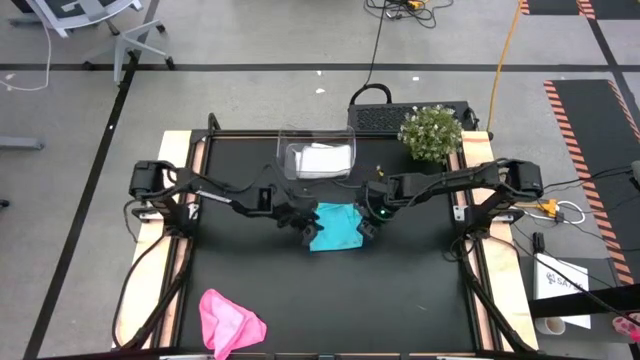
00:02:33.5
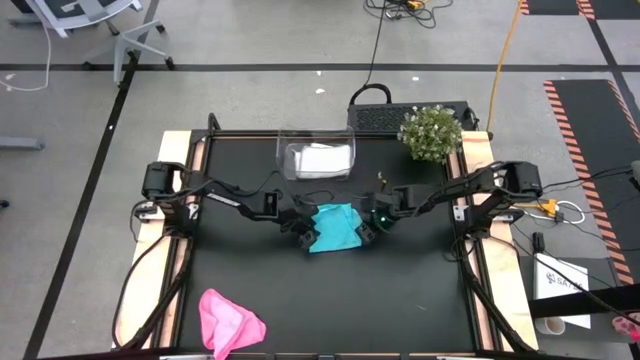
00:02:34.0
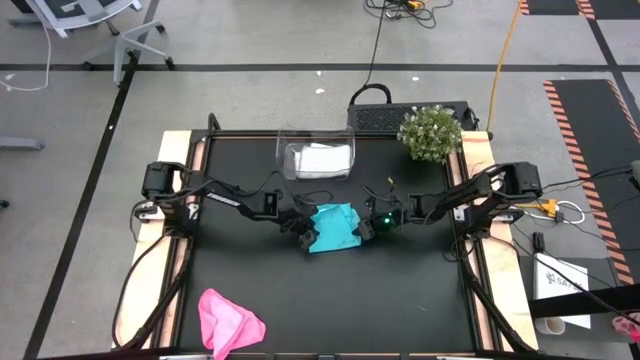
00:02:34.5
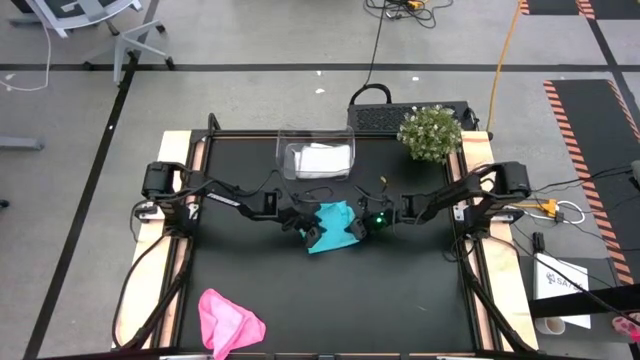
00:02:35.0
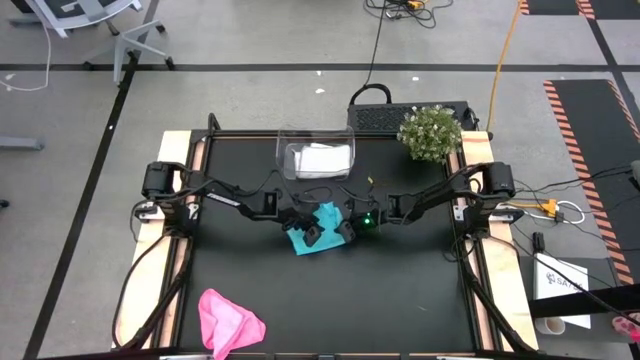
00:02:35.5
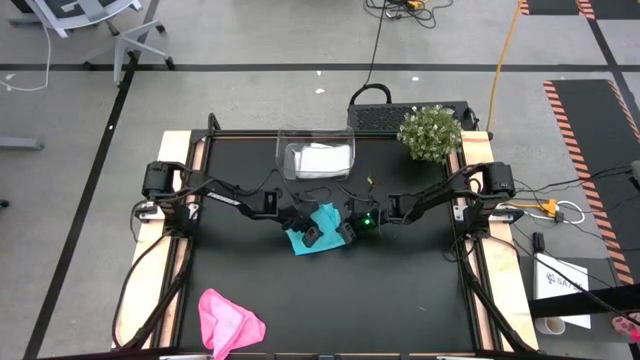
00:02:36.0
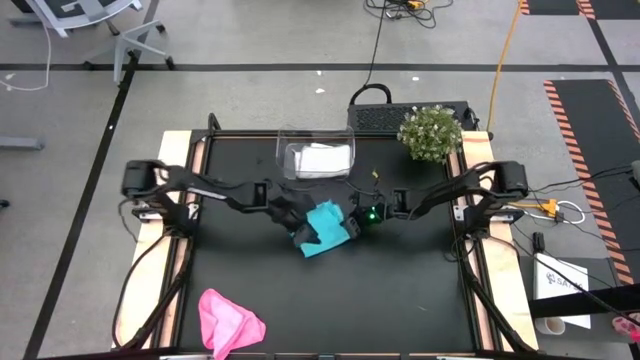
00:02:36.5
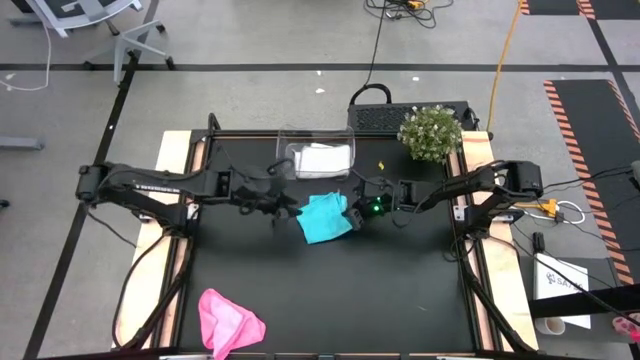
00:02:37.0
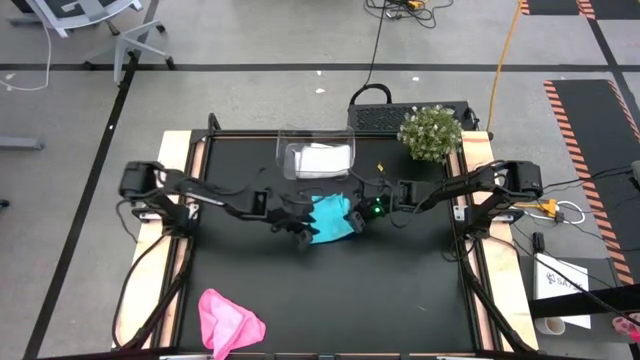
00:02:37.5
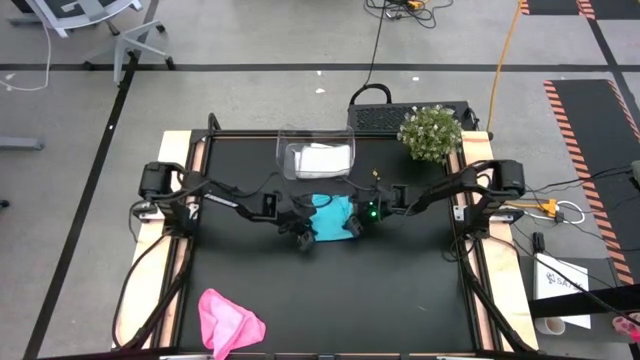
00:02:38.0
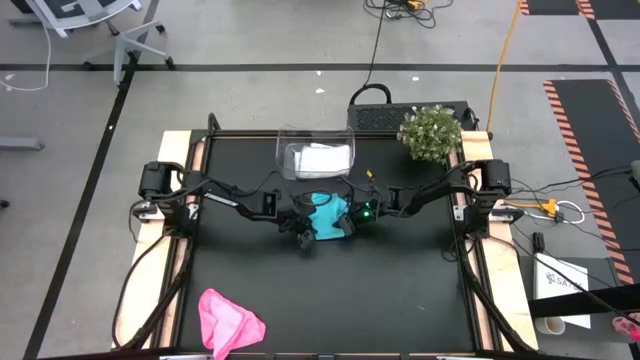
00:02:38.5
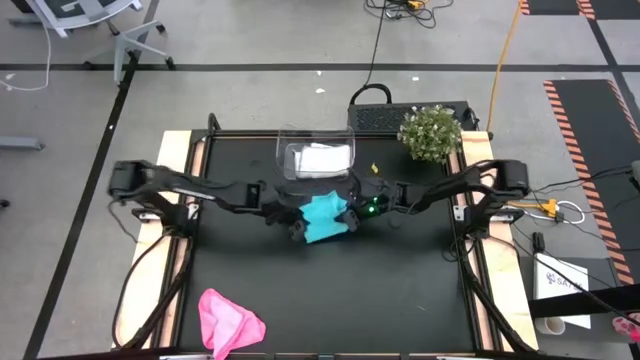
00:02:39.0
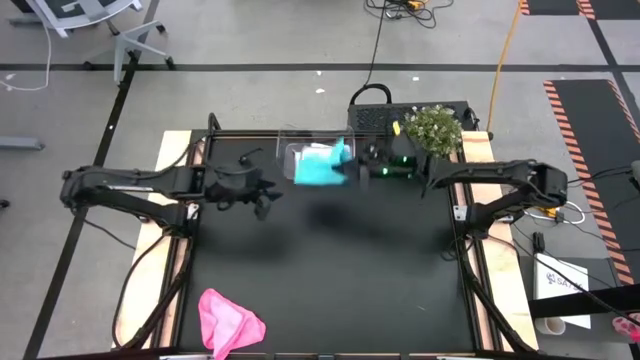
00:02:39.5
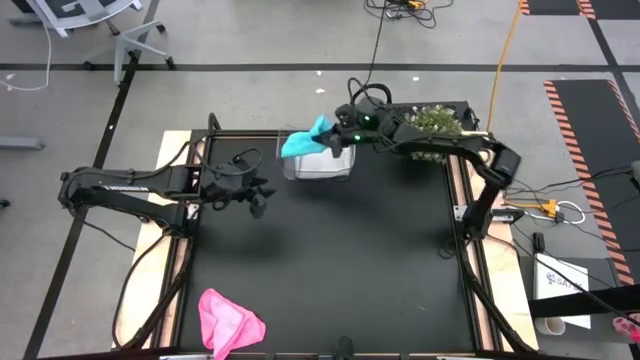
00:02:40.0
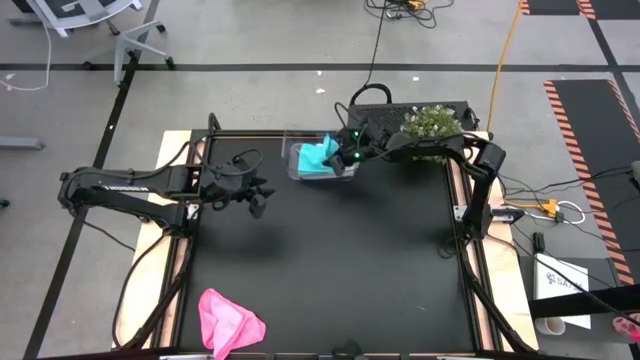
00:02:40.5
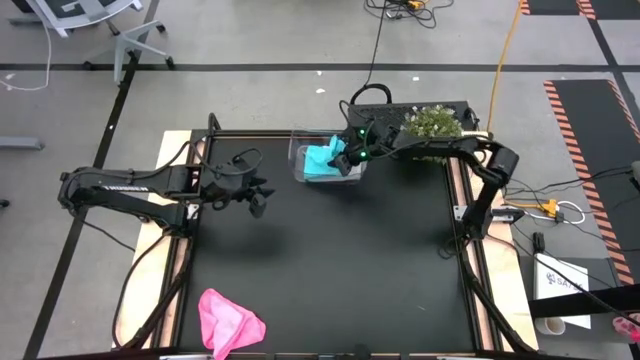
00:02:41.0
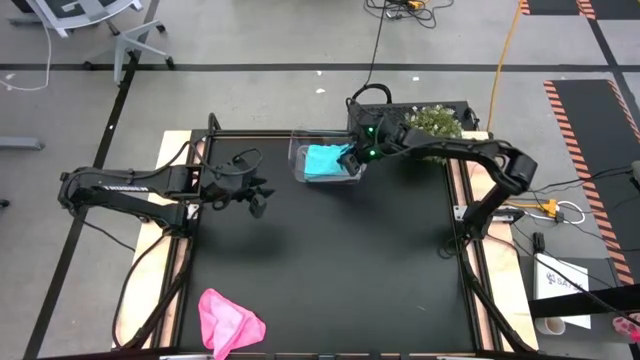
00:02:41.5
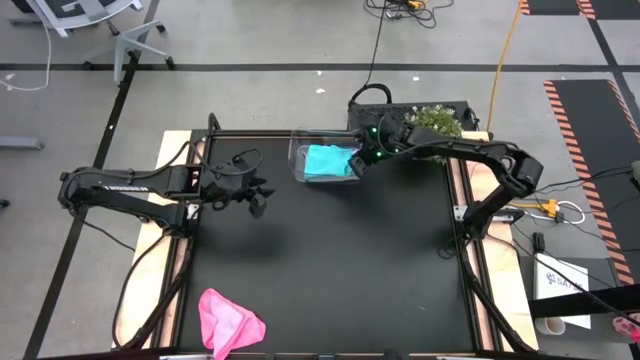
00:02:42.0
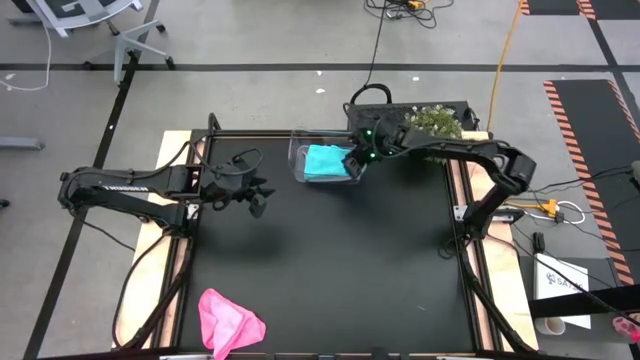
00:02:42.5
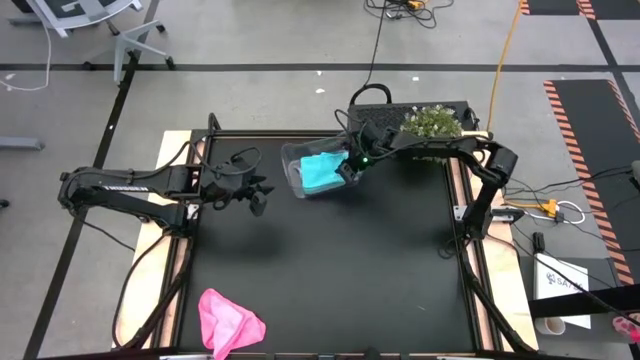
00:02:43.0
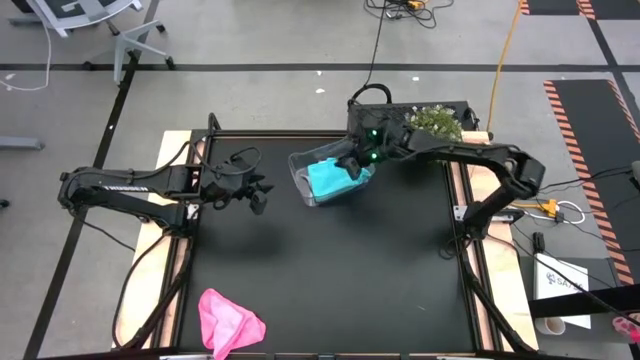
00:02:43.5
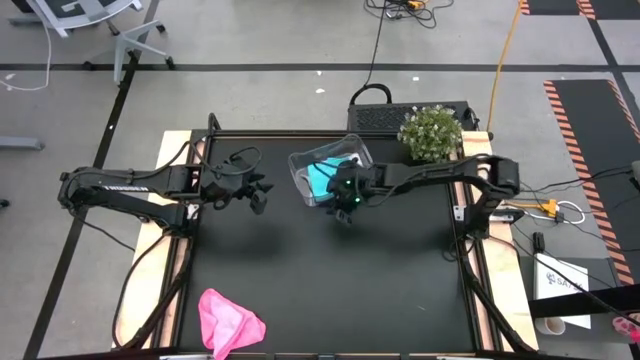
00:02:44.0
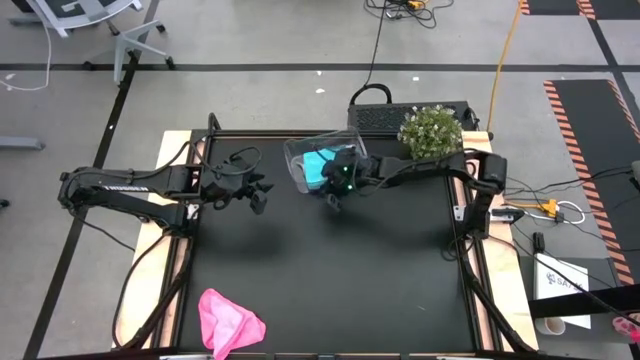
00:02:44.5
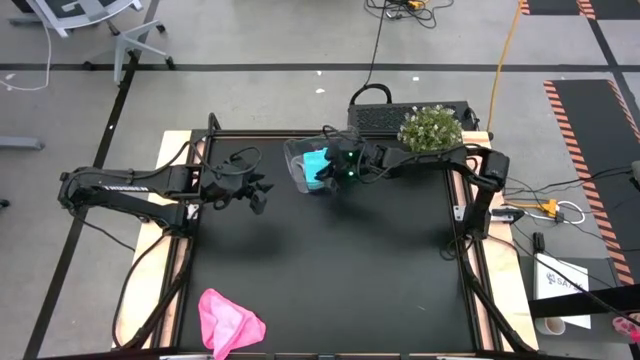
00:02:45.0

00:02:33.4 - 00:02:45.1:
Task: Fold microfiber towels
Put the blue microfiber towel into the transparent bin

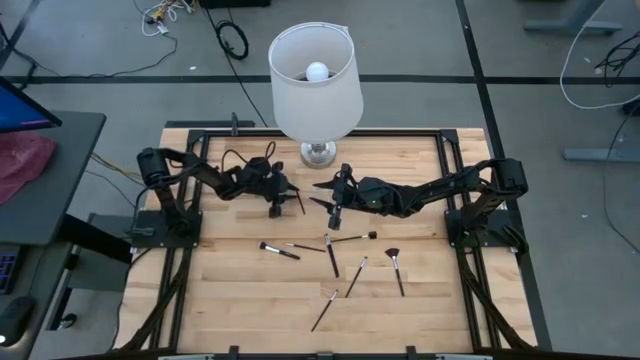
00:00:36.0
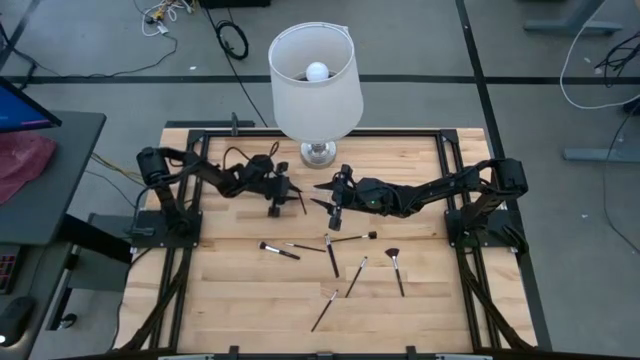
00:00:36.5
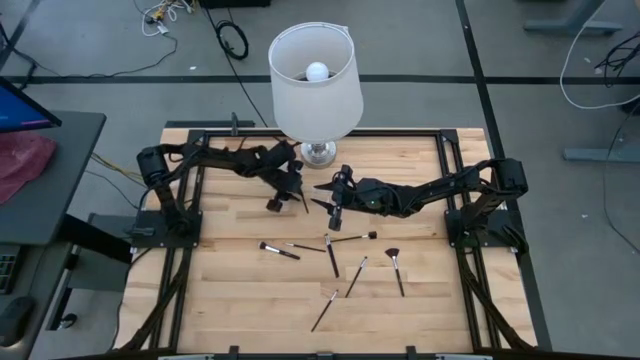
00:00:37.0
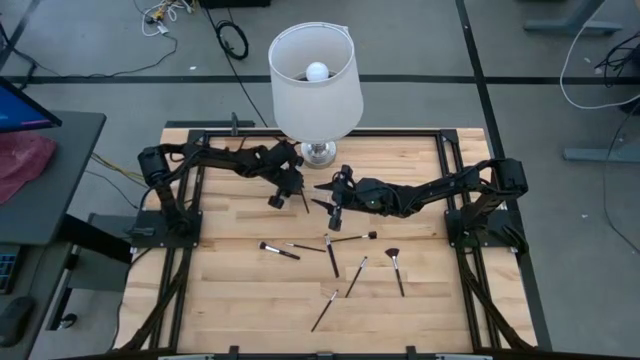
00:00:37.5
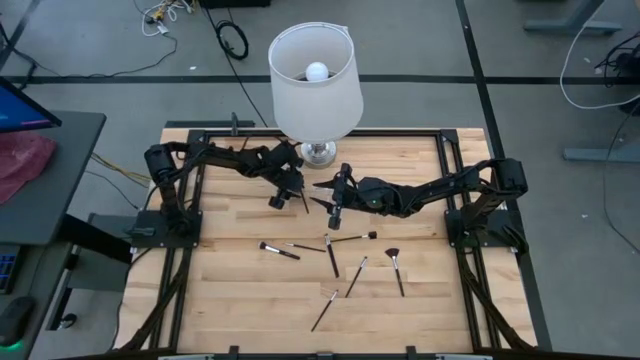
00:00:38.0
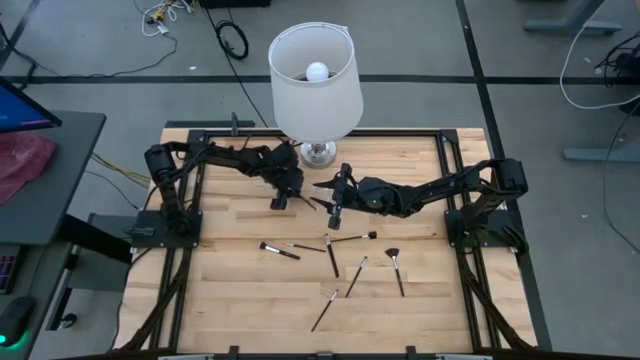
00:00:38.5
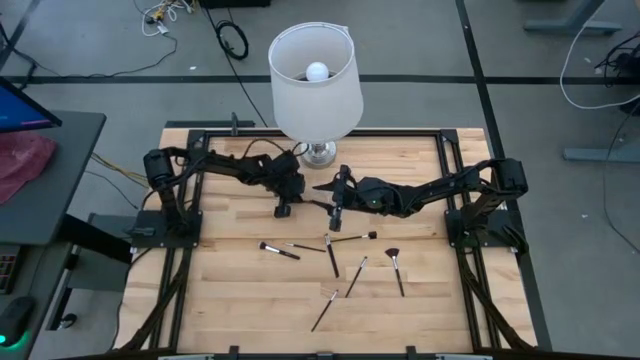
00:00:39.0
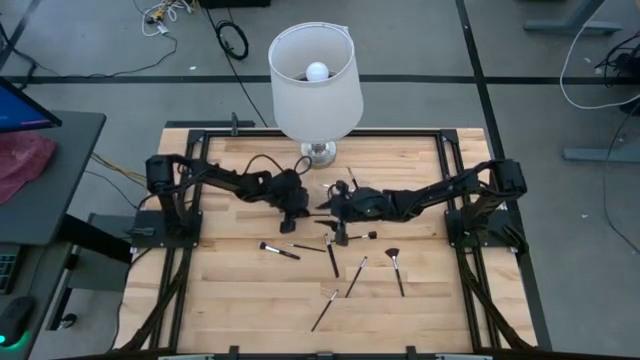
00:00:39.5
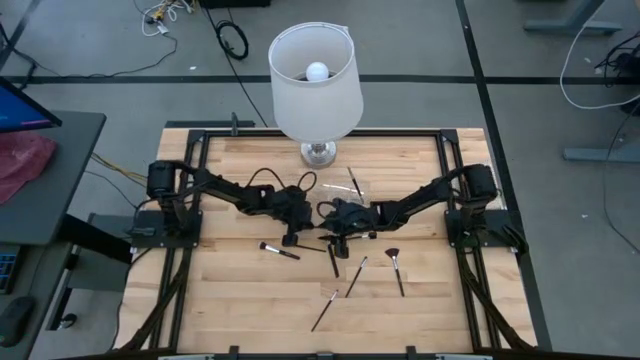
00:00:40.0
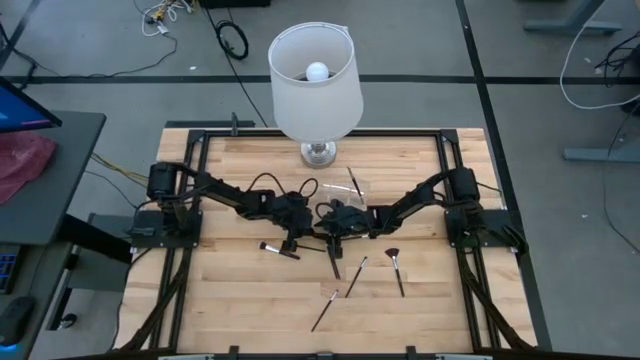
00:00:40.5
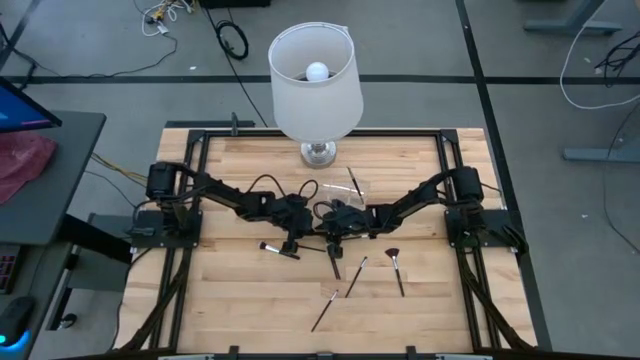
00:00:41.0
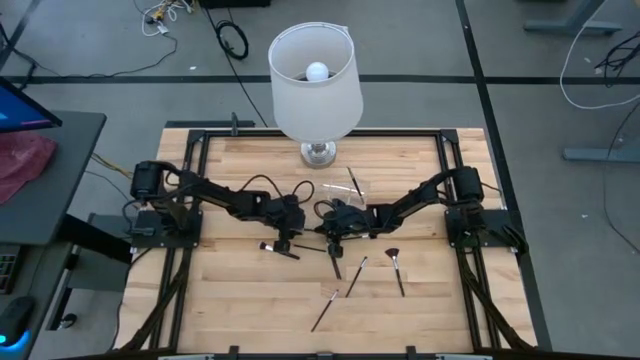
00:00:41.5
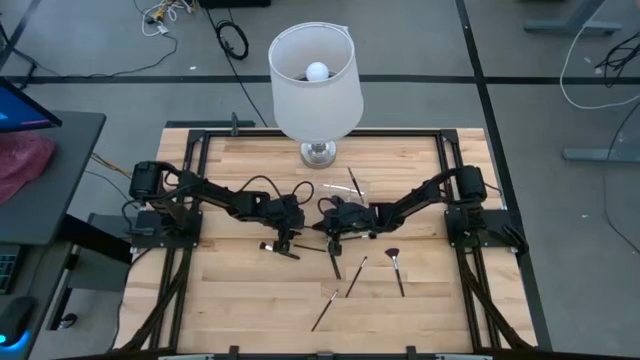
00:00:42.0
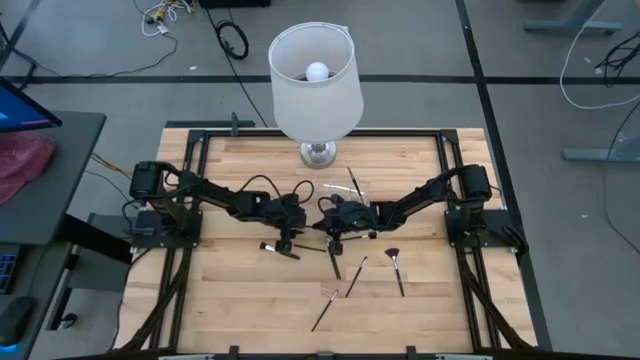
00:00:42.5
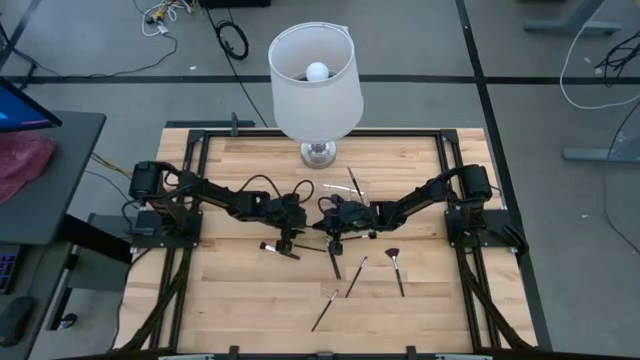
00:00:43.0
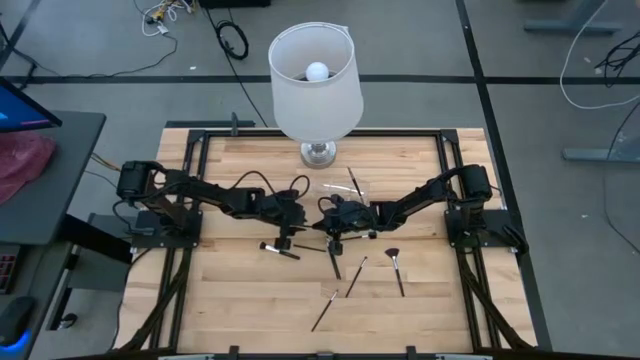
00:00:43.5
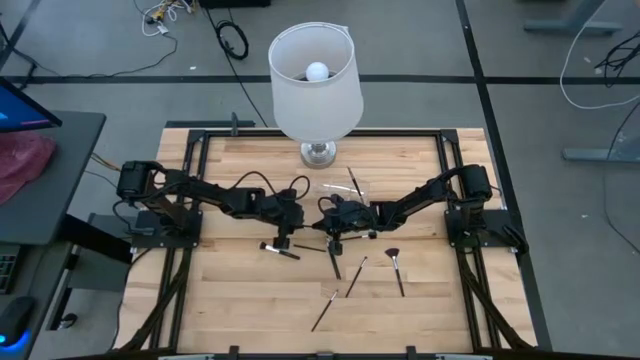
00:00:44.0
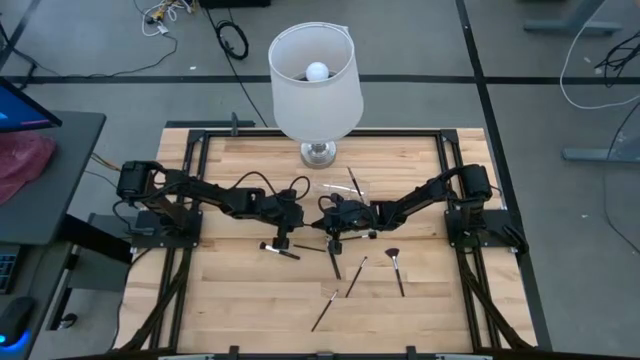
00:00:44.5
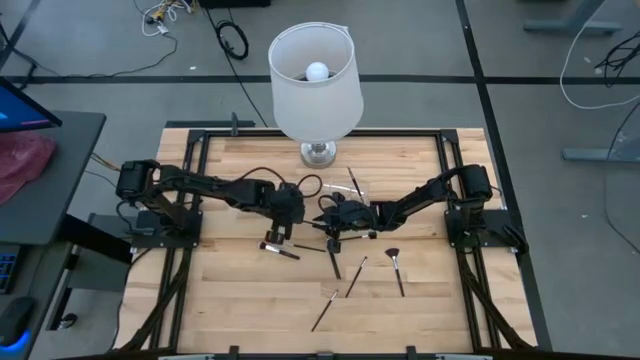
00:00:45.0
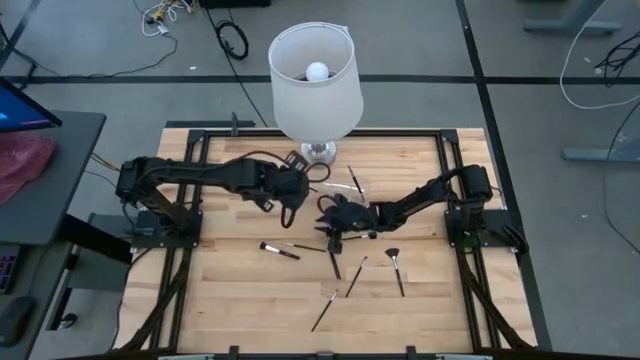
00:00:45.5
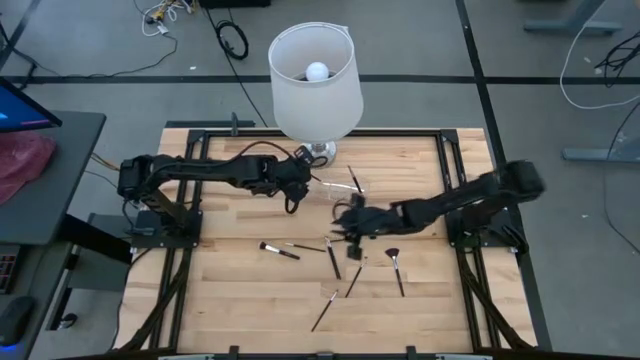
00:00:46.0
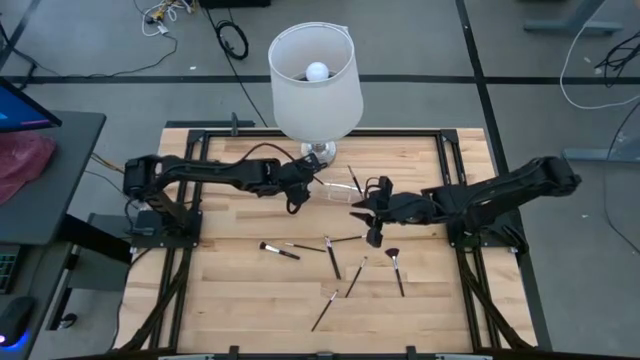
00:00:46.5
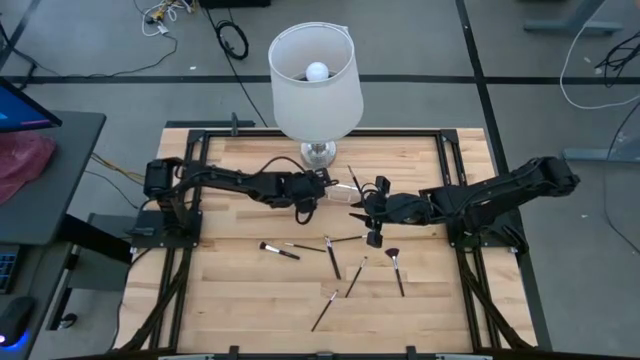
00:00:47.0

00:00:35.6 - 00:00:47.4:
Task: Put items in baskets/containers
Put the black eyeshadow brush into the transparent organizer
